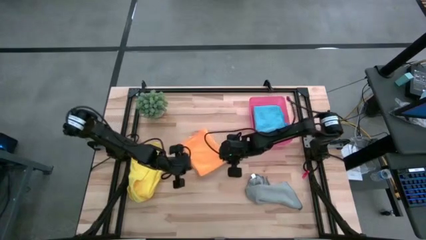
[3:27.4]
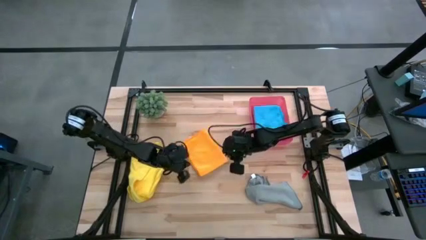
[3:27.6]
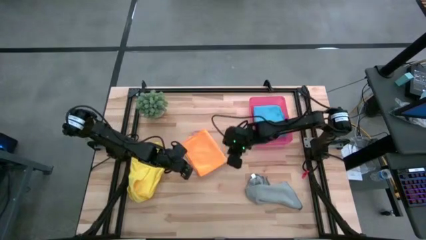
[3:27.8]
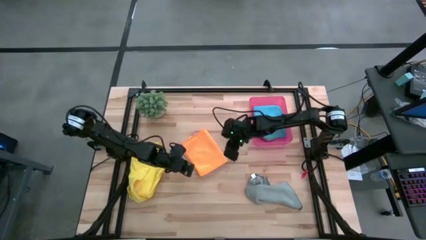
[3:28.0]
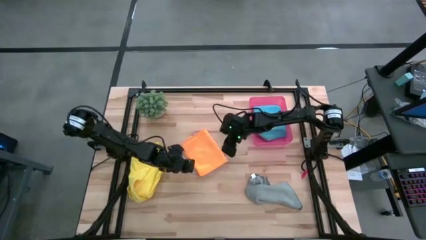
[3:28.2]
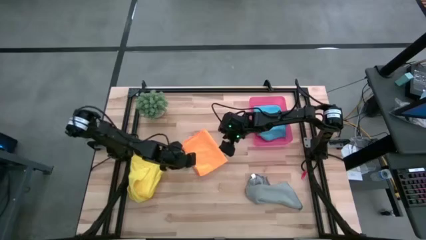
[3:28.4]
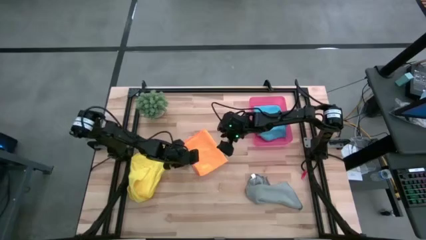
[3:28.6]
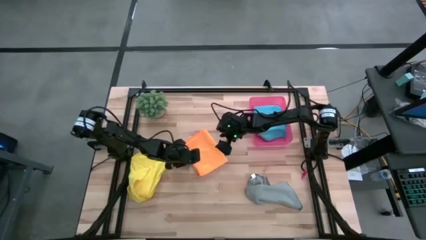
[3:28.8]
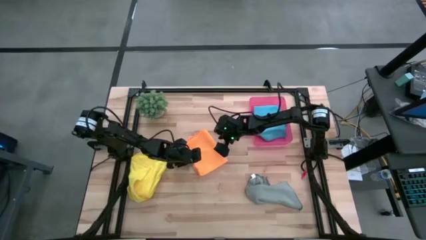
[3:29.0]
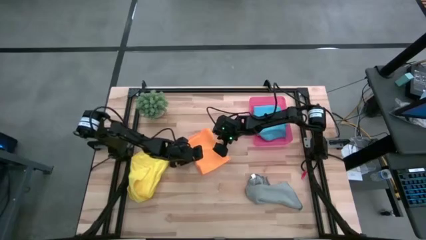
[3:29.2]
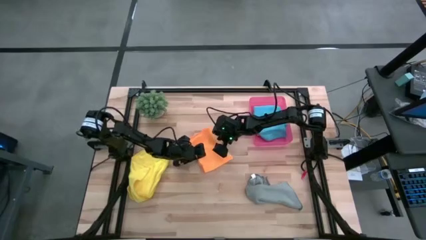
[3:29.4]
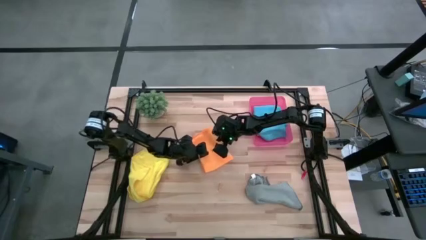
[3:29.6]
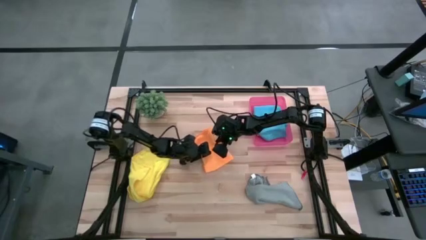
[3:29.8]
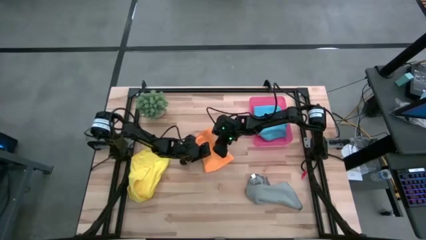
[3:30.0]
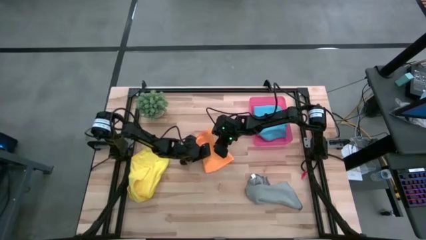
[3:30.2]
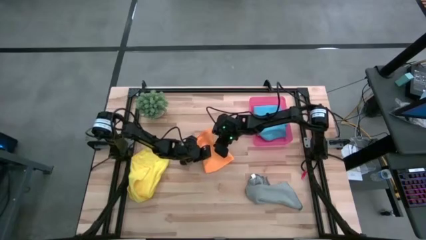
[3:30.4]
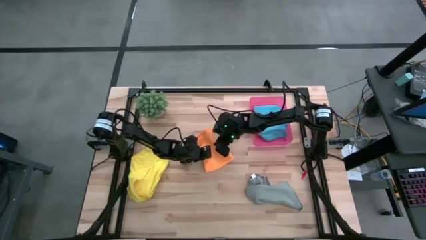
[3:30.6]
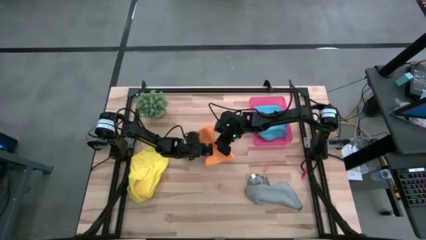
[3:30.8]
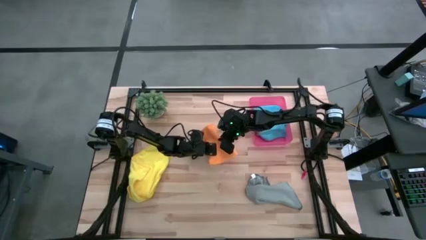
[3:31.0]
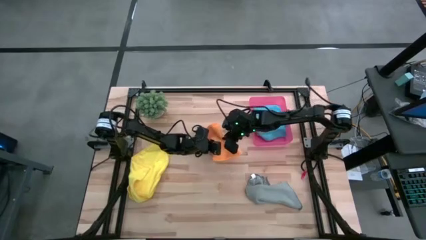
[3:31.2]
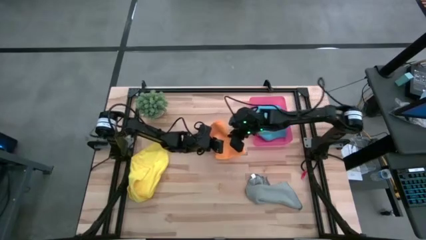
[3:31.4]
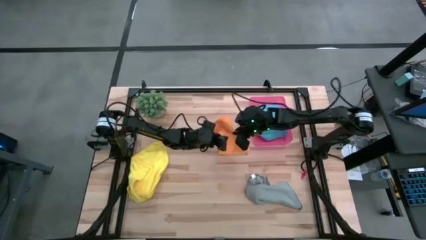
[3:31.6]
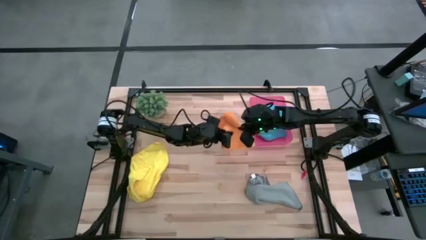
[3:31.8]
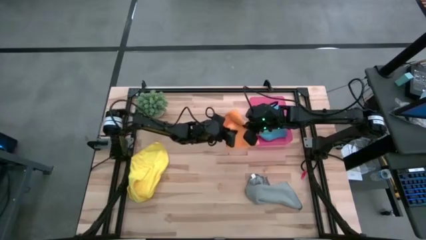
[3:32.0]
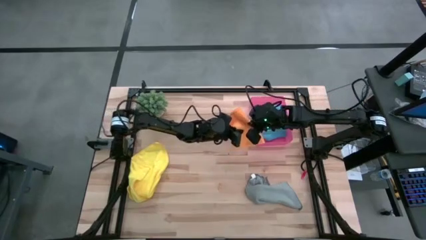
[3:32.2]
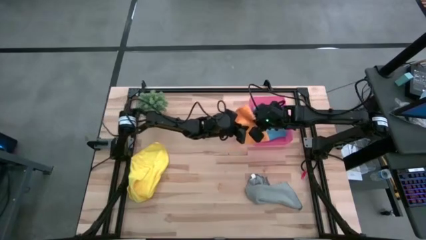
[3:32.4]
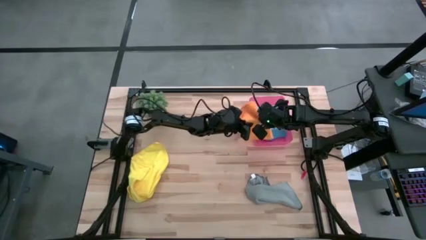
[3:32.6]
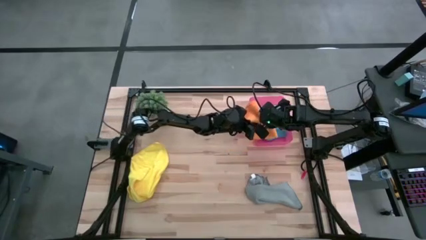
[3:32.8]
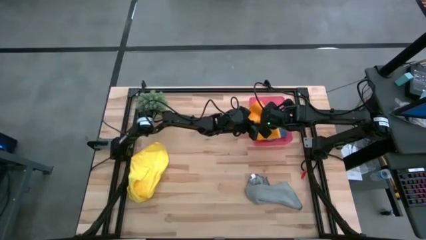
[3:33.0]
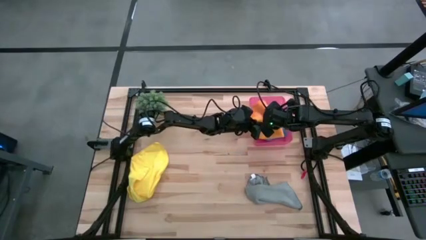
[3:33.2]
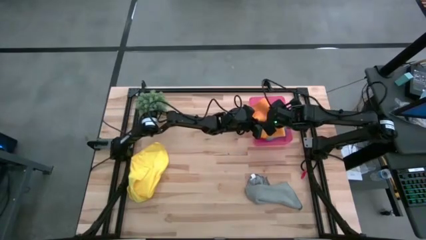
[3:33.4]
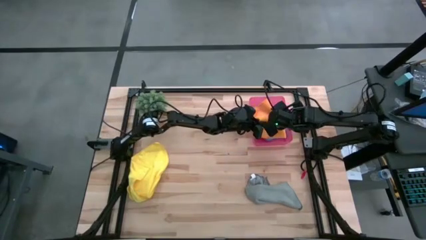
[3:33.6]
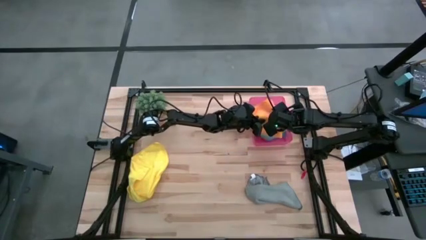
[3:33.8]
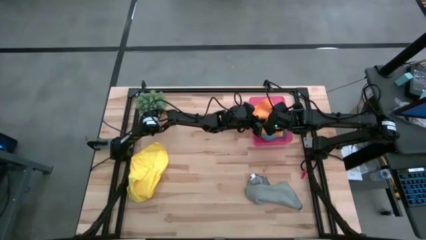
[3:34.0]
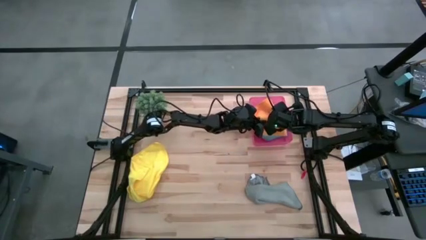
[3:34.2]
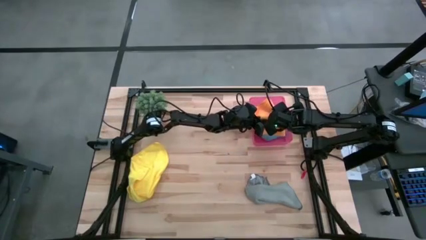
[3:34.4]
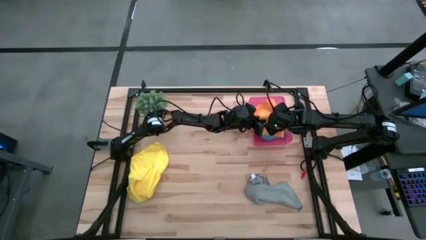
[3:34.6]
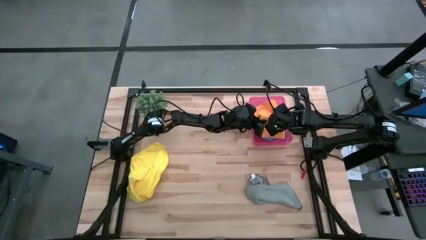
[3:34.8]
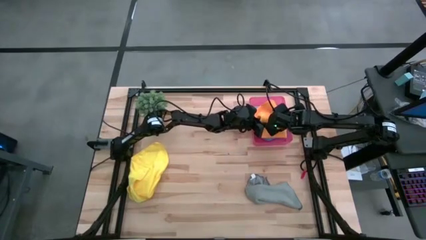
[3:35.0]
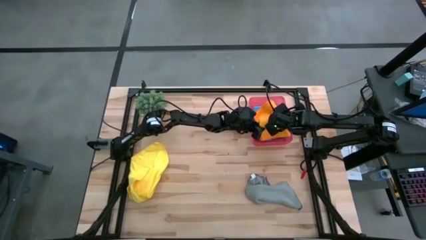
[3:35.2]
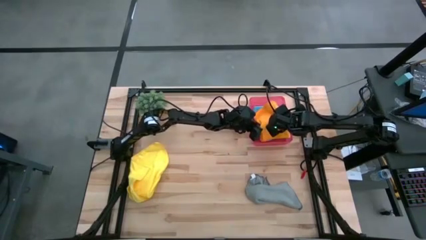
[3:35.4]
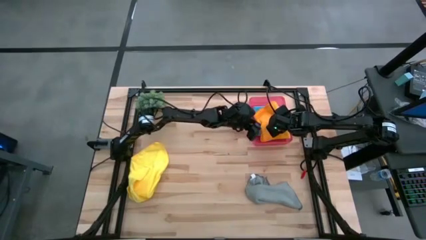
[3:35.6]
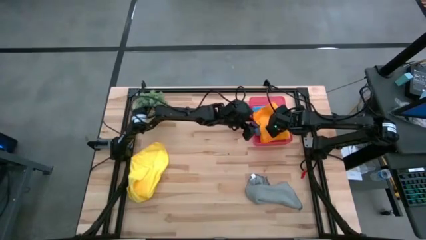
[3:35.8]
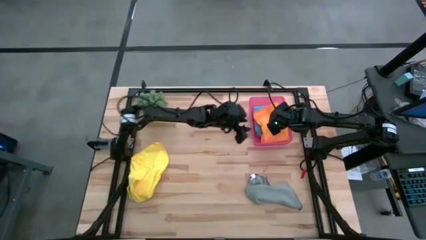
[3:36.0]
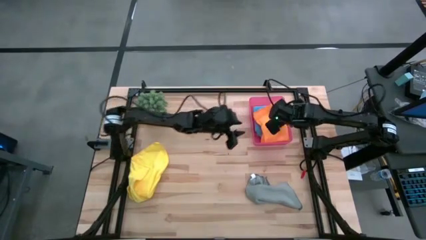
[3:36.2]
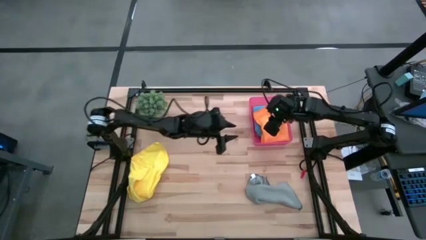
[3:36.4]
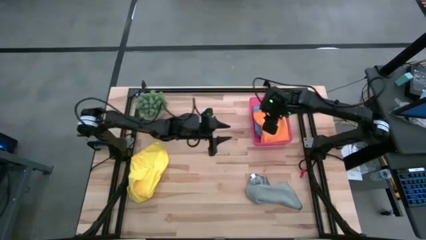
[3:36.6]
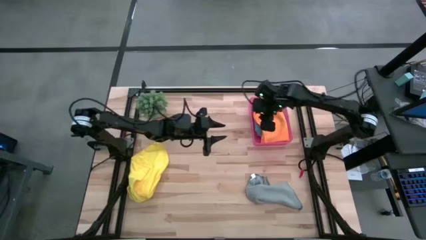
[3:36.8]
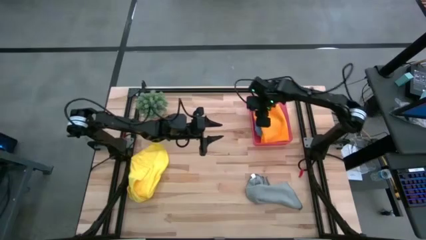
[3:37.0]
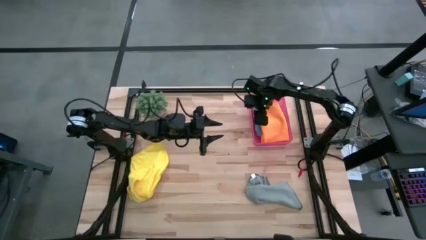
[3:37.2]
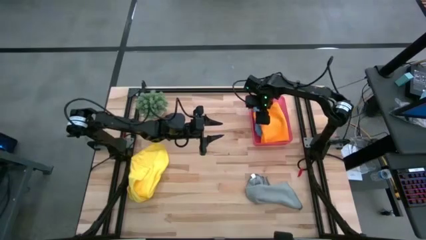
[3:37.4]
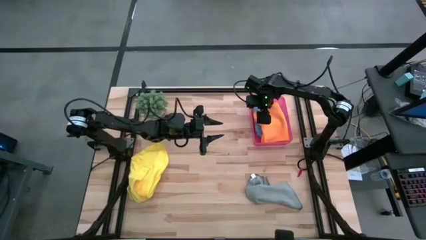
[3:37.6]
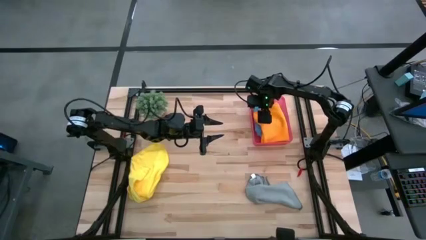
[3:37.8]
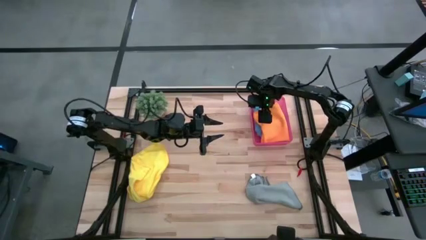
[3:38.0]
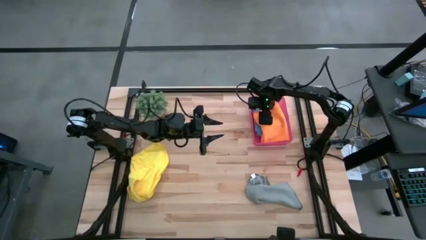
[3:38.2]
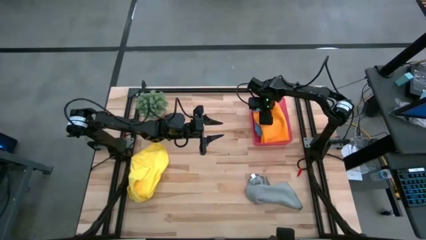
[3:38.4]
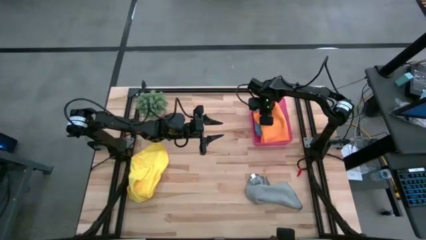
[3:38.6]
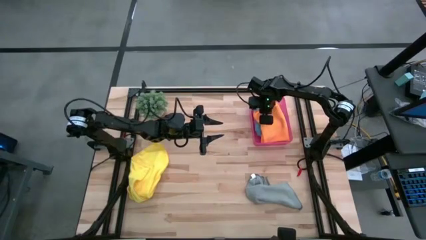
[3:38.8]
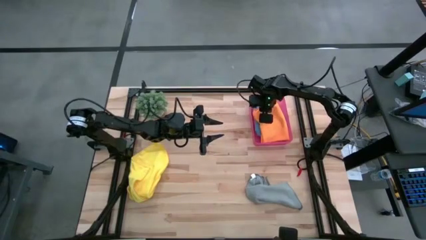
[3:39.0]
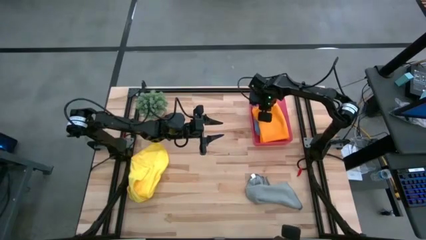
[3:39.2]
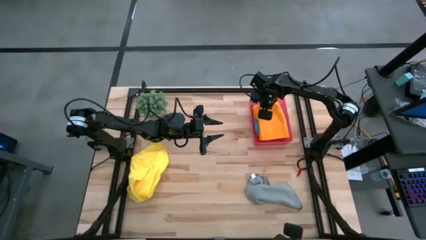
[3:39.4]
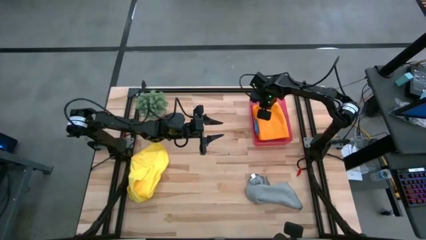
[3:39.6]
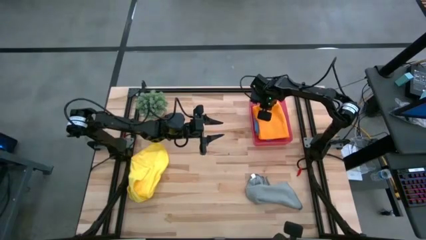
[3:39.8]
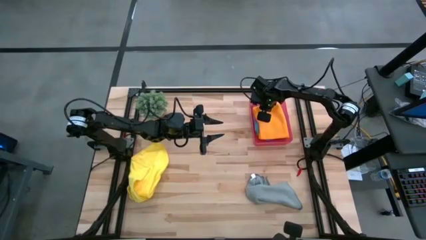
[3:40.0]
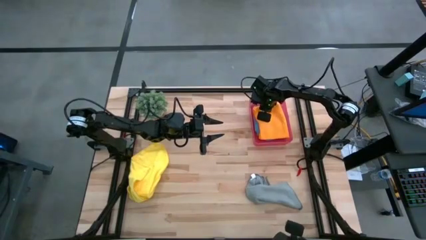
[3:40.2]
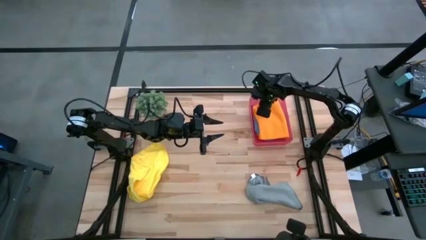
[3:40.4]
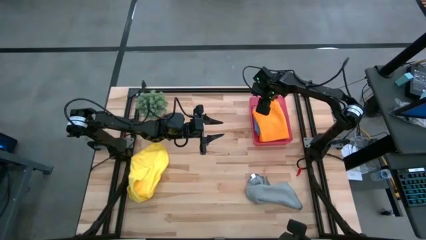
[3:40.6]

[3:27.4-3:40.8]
Task: Fold microfiber towels
Put the orange microfiber cloth into the pink bin
